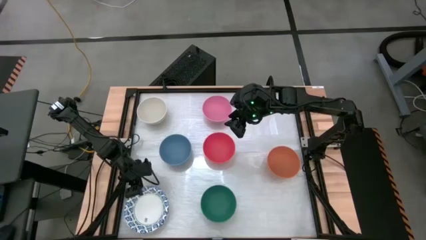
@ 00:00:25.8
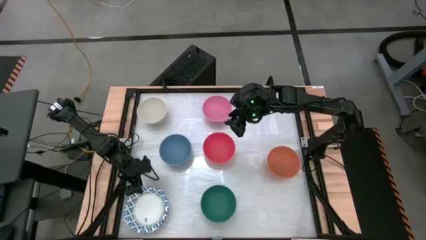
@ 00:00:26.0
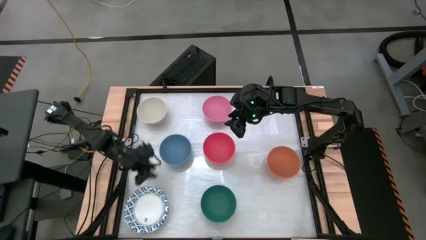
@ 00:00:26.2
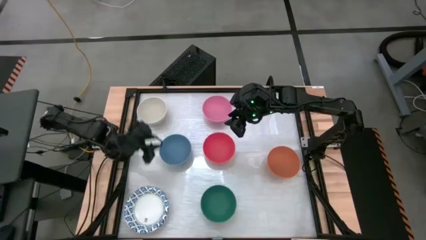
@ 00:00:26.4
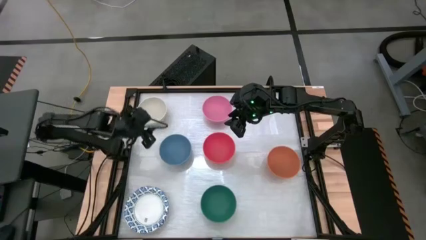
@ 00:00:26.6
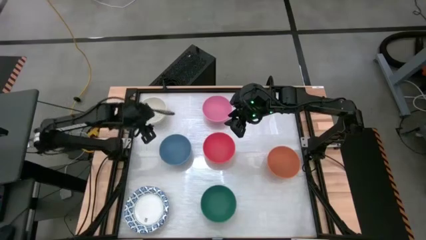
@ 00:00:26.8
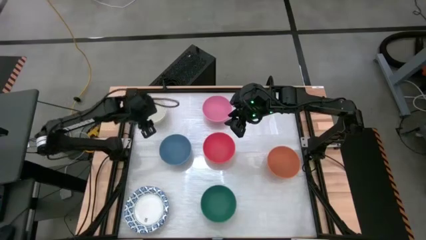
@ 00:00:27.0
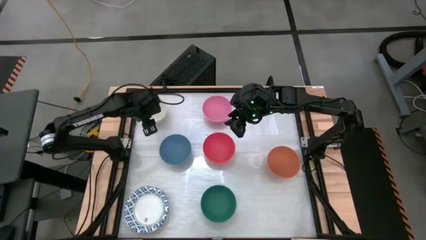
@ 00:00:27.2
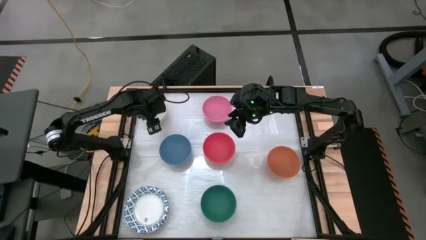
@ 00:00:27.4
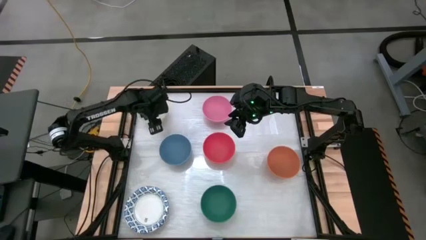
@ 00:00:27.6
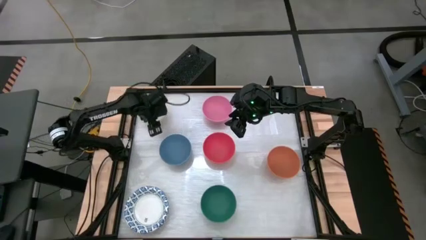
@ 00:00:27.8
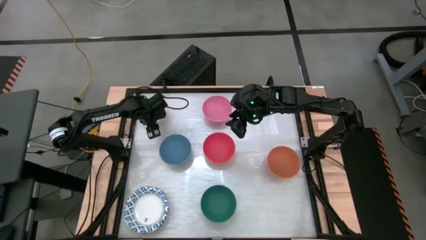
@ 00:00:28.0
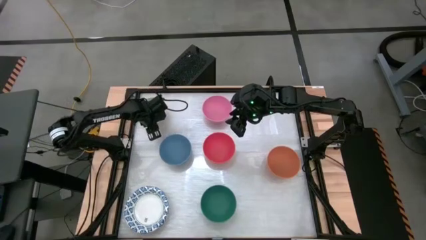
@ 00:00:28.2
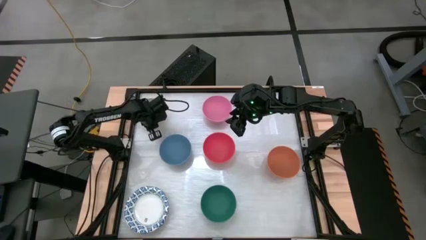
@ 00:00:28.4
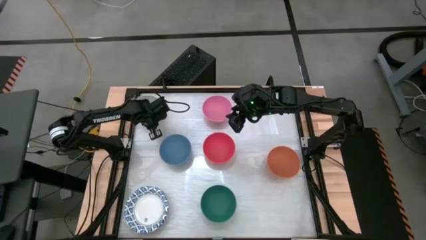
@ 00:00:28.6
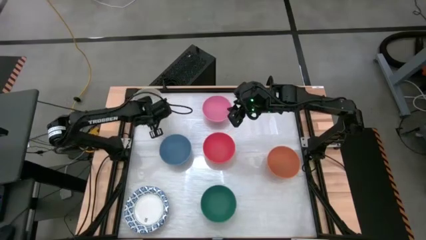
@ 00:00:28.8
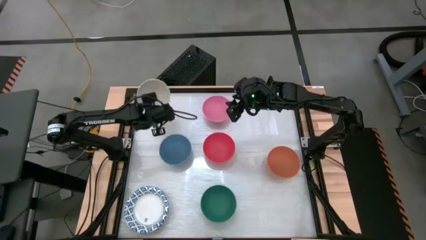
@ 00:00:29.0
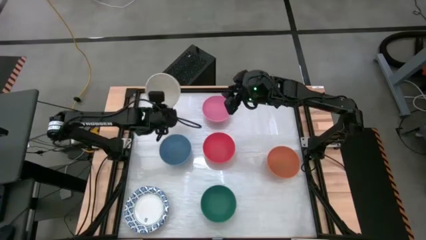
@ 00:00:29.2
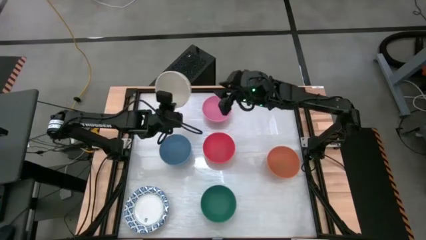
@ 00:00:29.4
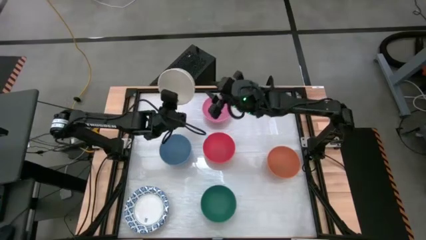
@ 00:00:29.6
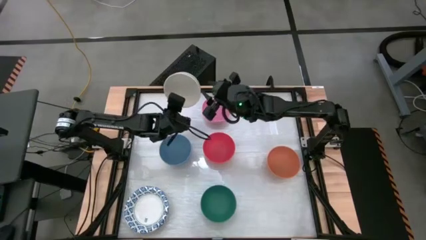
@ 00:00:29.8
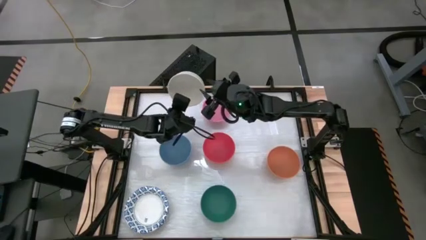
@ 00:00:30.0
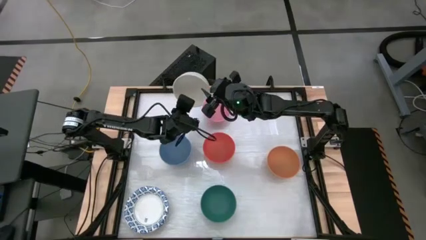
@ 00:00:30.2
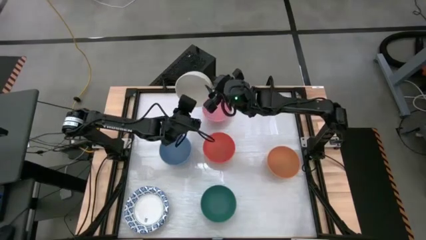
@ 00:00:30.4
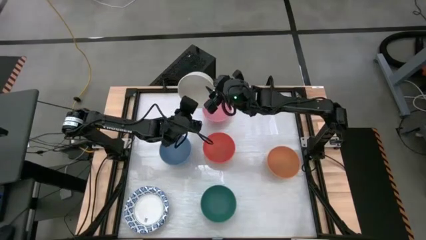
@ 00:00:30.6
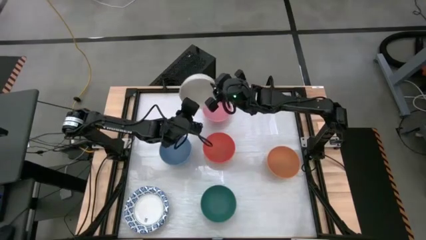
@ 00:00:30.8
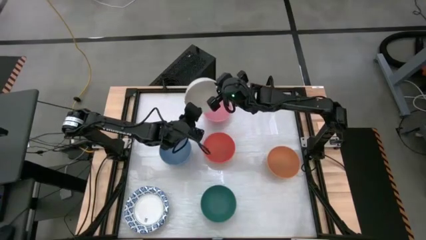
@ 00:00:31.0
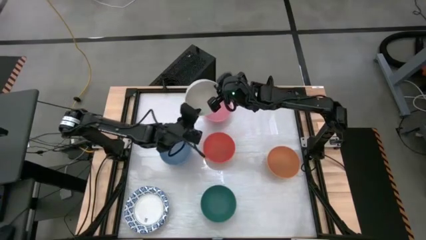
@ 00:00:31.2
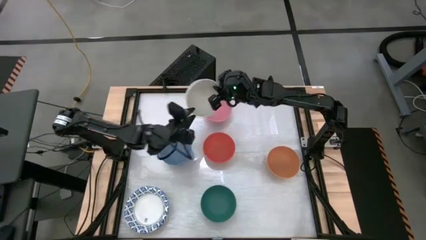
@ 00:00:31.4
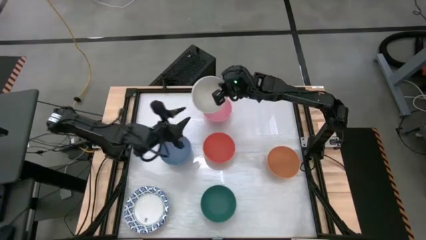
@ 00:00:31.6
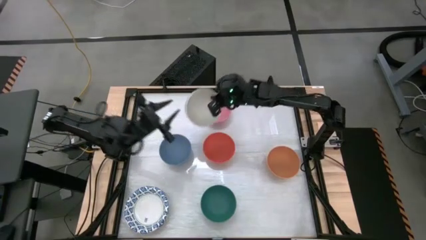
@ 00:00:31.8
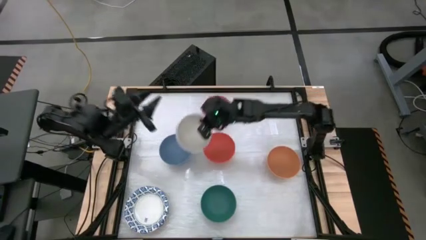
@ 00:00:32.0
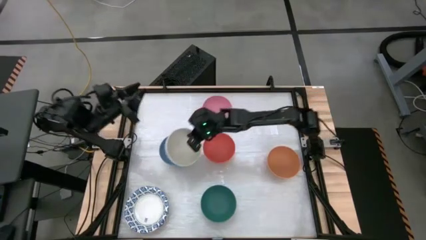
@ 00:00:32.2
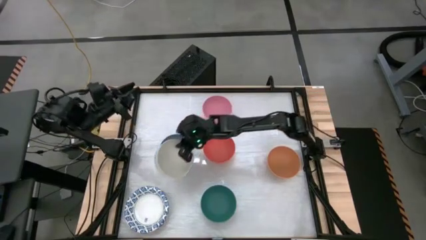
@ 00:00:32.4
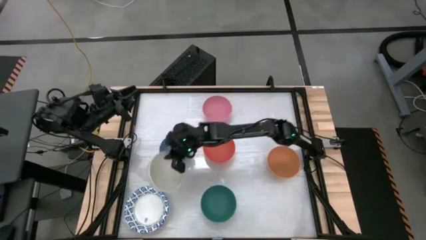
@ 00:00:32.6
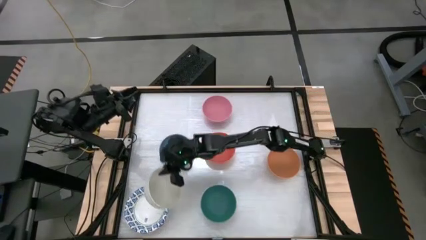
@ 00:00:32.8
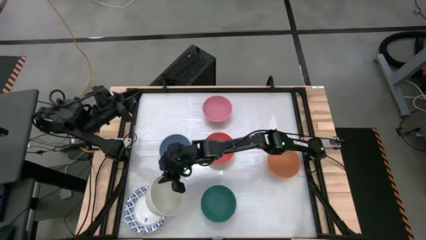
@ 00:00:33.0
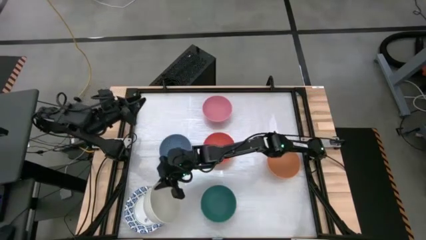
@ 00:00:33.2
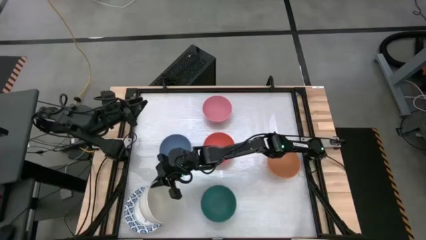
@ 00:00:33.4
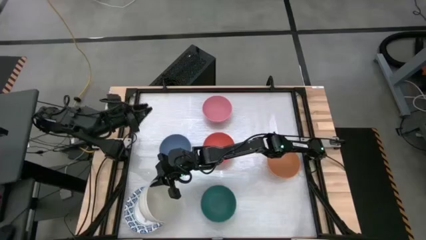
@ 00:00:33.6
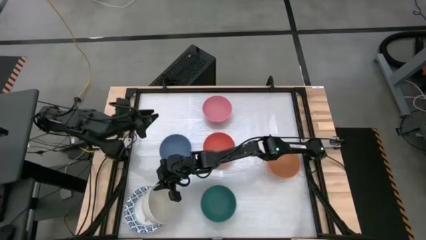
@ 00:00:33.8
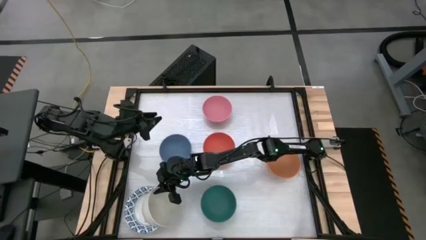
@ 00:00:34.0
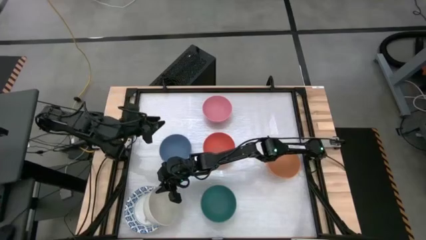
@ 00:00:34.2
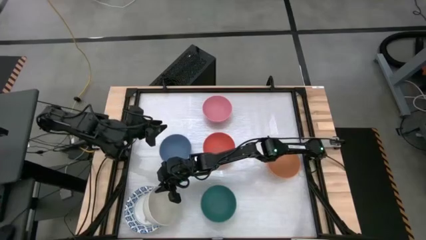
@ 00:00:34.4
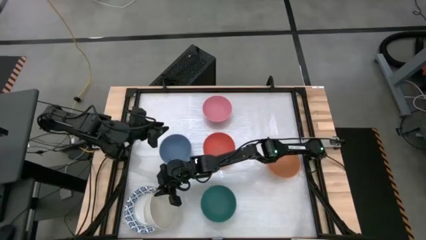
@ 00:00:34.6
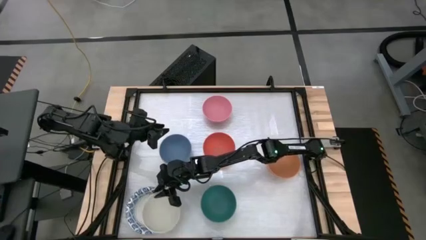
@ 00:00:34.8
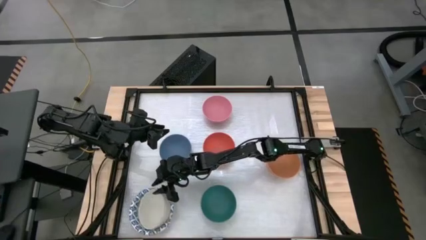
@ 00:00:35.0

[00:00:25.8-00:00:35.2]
Stack the white bowl on top of the white patterned bowls

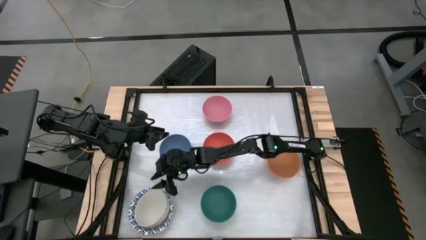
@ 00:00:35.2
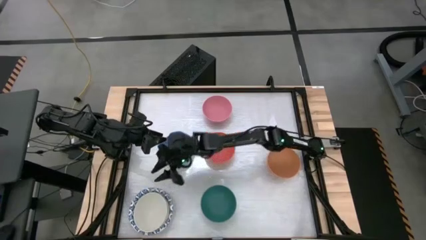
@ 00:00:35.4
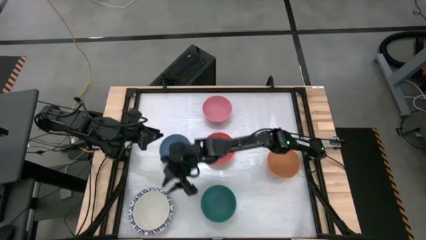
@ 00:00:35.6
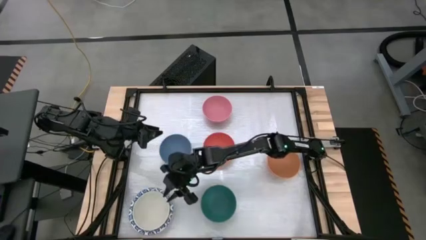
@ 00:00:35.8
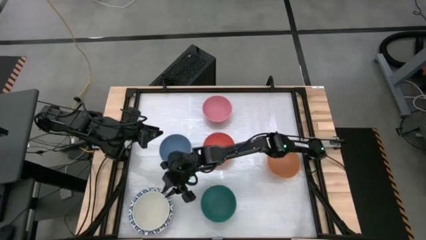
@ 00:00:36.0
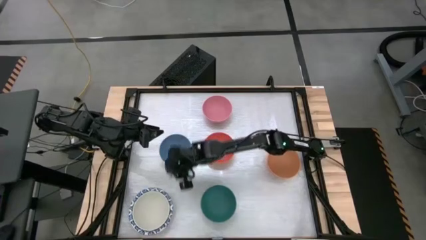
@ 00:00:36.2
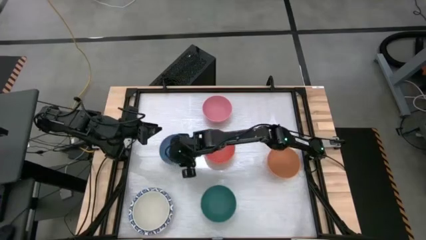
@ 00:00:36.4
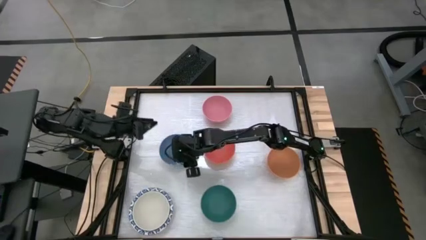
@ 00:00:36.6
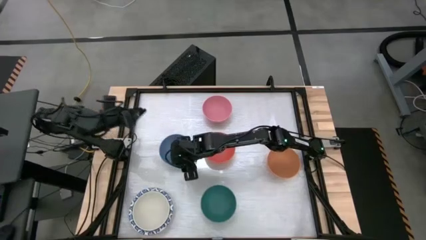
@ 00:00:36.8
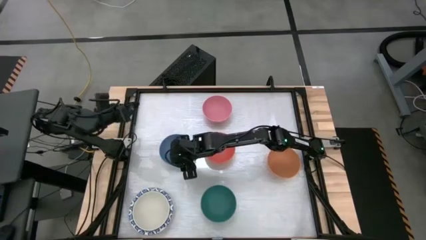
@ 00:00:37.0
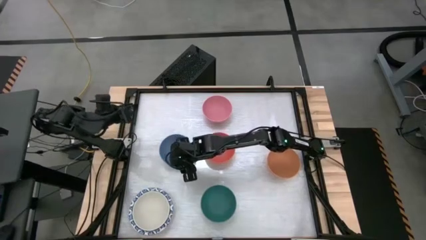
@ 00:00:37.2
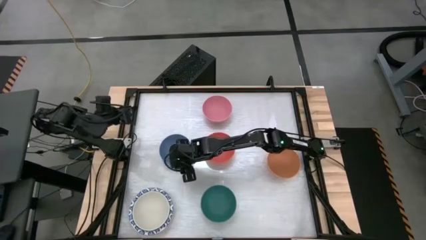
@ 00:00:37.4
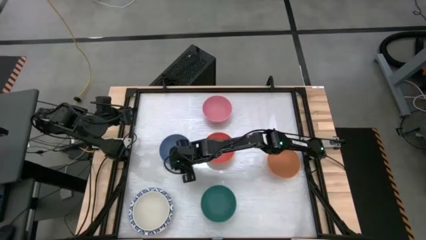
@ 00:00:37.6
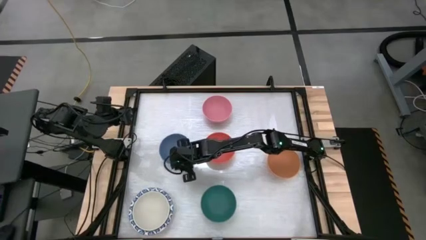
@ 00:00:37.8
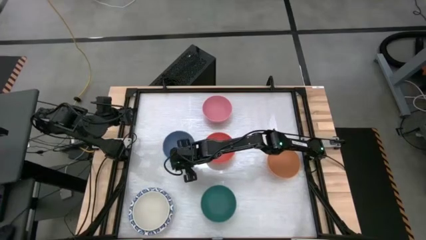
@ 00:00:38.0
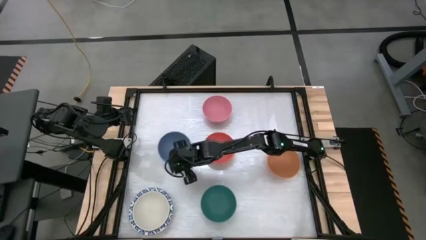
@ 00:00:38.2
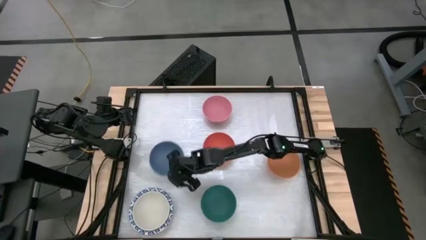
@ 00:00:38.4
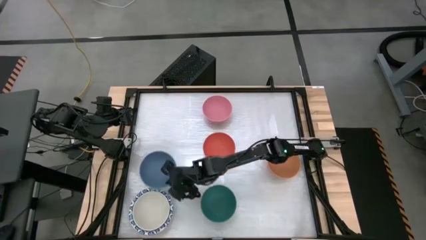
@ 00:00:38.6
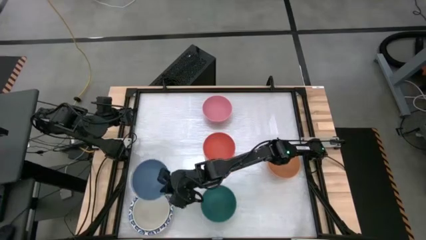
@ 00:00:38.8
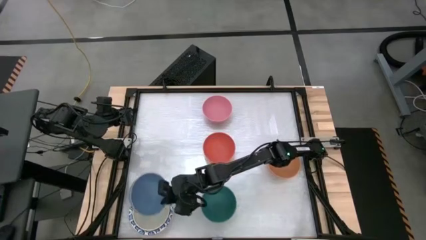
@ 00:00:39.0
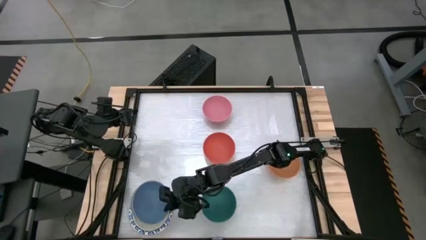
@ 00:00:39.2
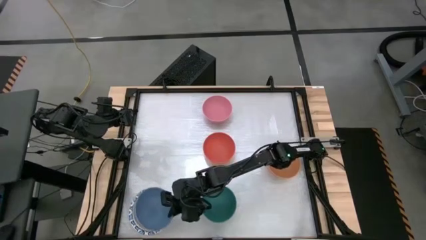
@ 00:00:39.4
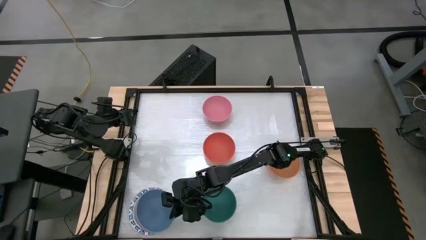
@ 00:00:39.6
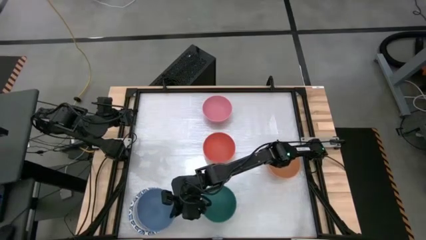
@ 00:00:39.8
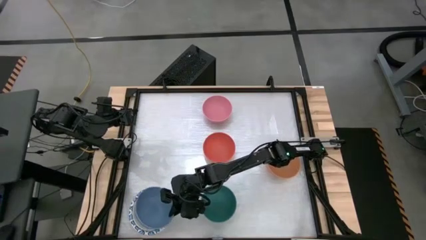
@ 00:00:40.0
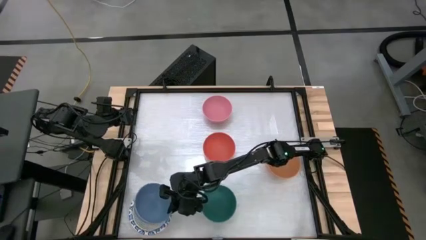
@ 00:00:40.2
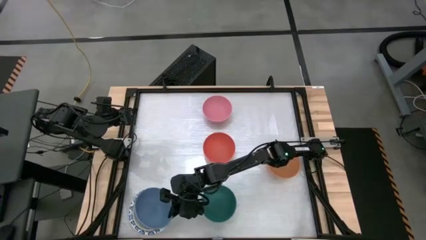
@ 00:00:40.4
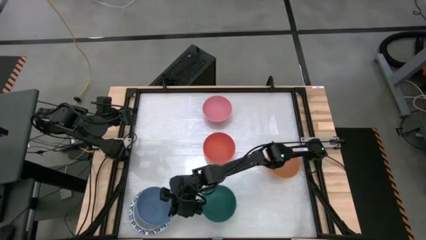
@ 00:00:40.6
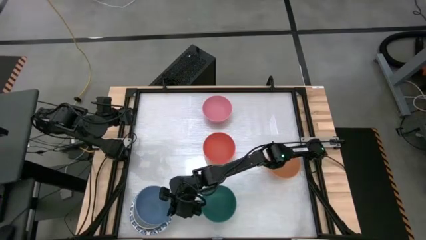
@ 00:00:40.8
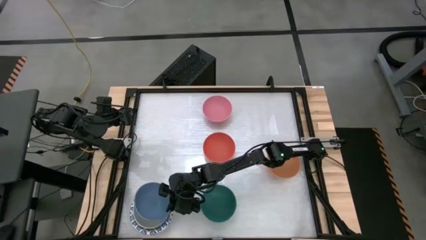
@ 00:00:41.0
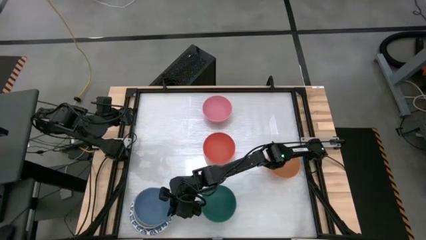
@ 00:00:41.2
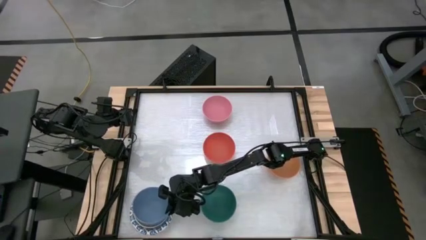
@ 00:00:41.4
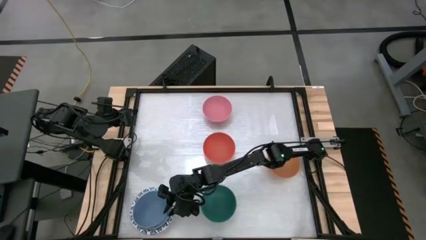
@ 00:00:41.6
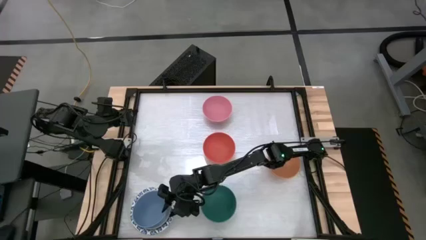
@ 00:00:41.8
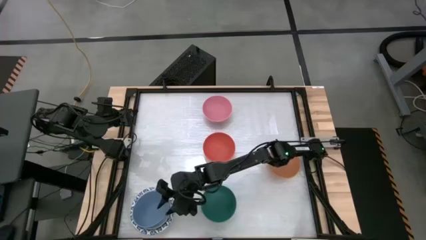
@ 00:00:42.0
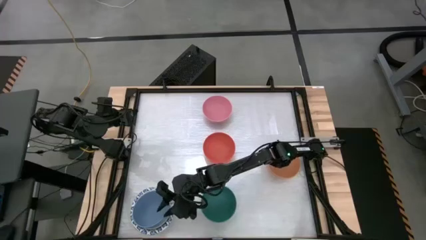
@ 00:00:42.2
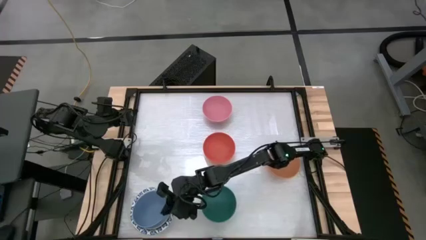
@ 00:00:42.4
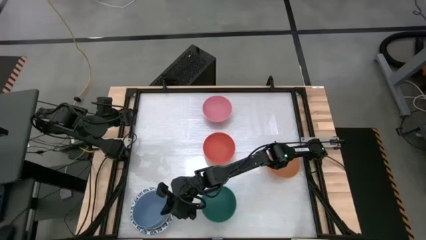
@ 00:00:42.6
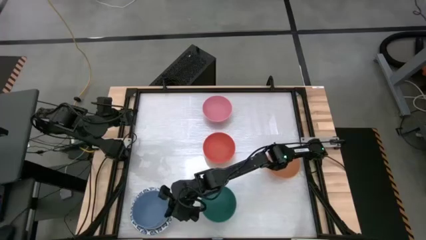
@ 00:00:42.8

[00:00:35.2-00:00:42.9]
Stack the blue bowl on top of the white bowl
